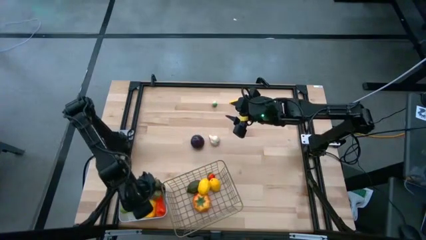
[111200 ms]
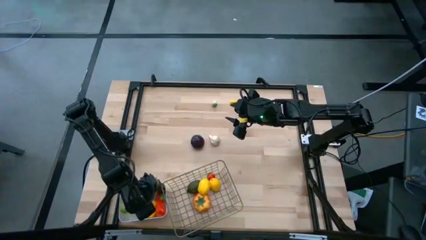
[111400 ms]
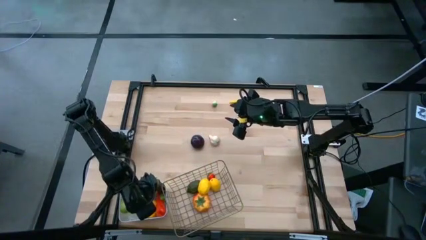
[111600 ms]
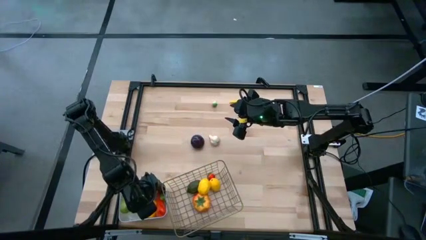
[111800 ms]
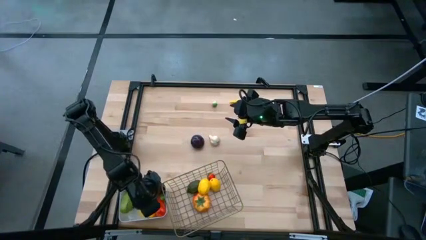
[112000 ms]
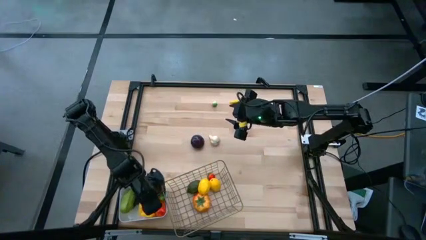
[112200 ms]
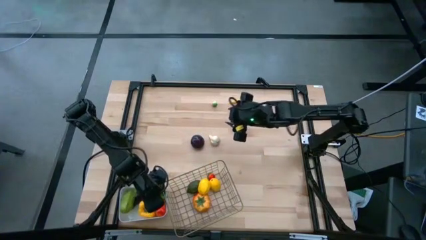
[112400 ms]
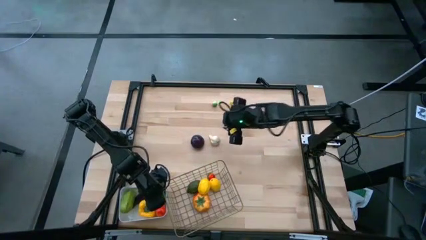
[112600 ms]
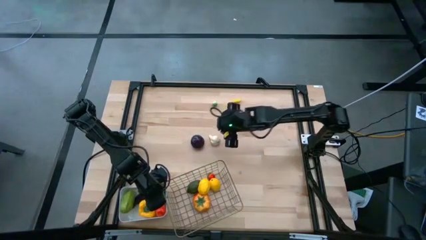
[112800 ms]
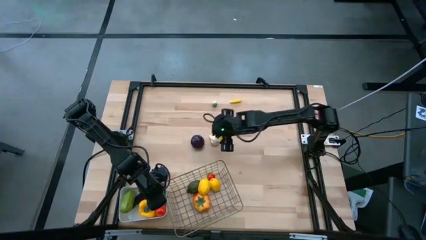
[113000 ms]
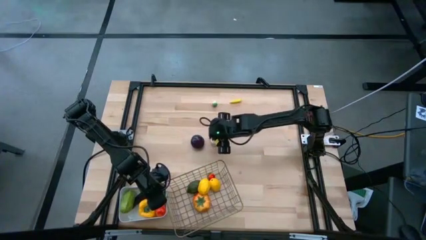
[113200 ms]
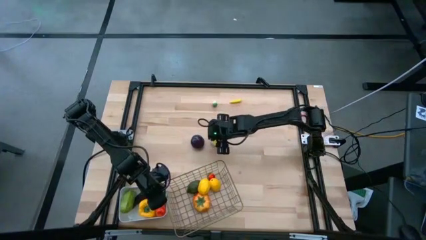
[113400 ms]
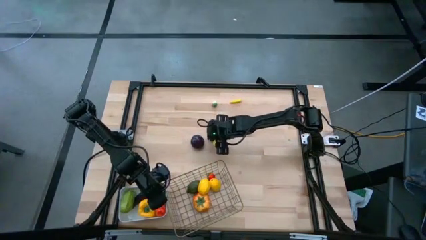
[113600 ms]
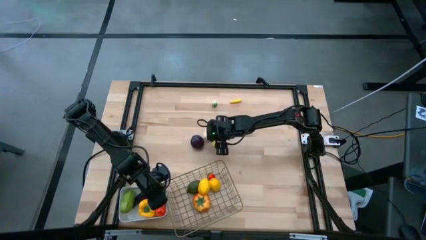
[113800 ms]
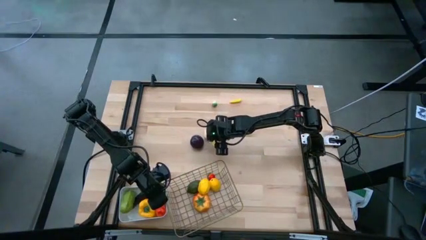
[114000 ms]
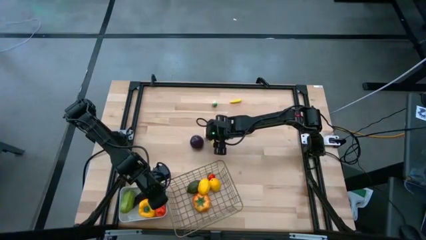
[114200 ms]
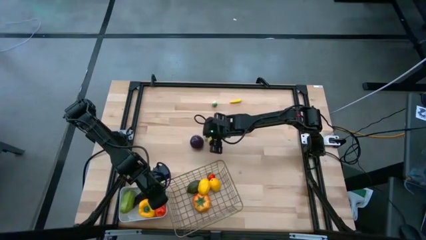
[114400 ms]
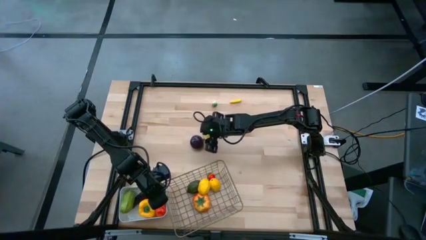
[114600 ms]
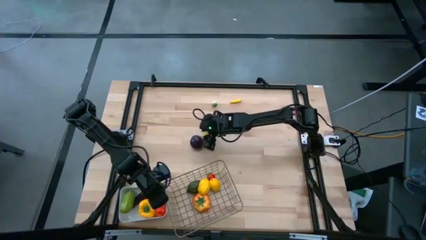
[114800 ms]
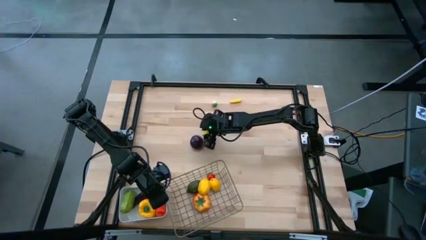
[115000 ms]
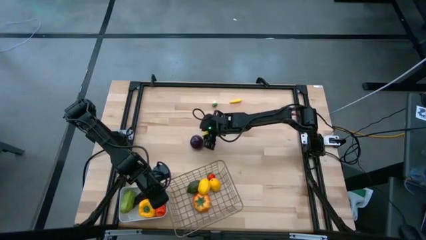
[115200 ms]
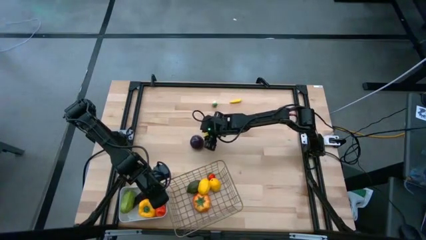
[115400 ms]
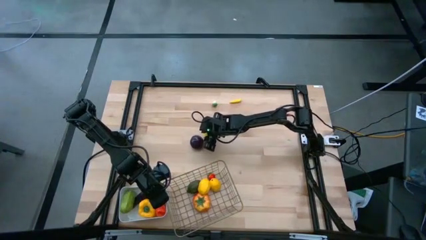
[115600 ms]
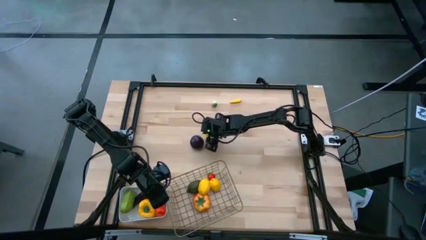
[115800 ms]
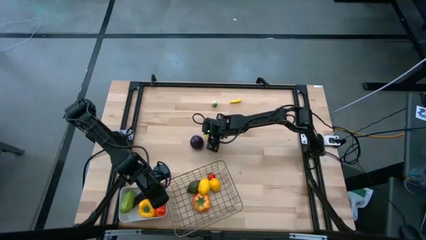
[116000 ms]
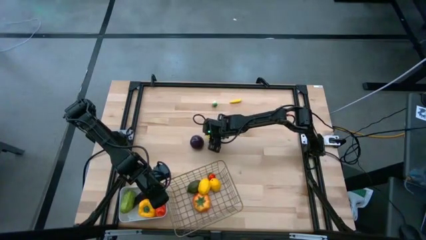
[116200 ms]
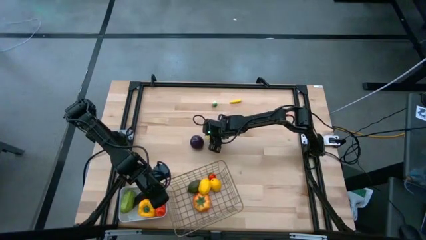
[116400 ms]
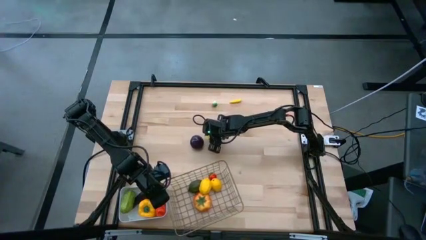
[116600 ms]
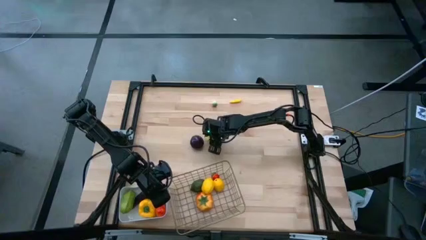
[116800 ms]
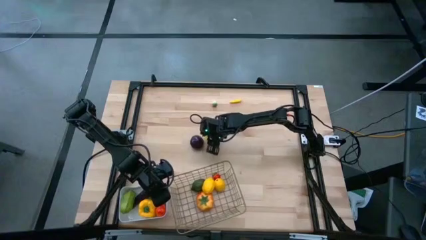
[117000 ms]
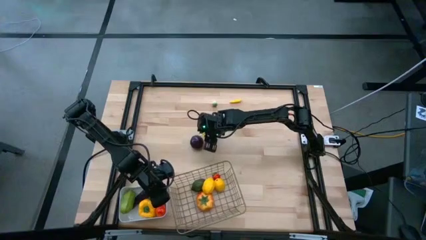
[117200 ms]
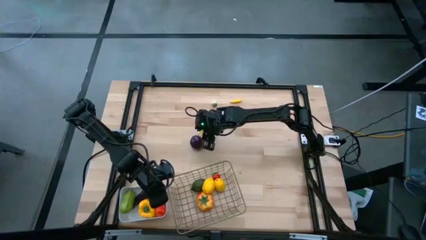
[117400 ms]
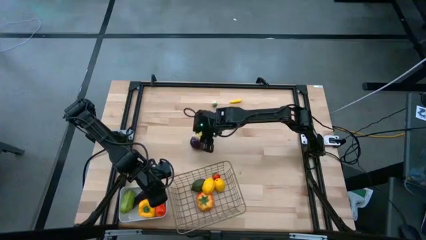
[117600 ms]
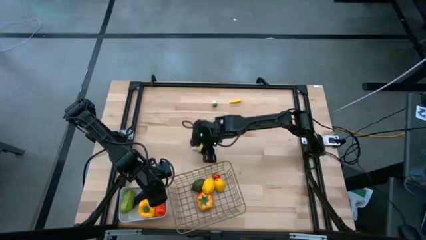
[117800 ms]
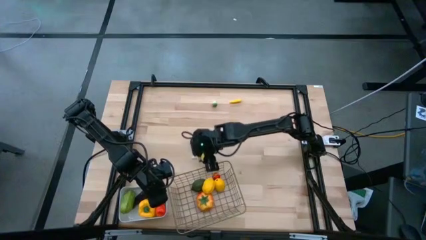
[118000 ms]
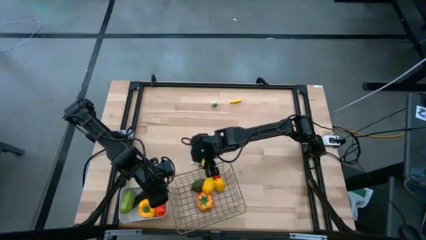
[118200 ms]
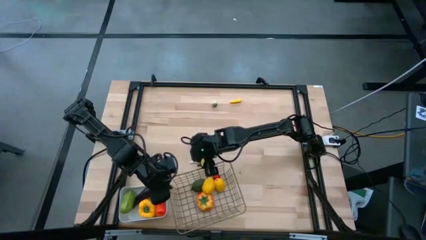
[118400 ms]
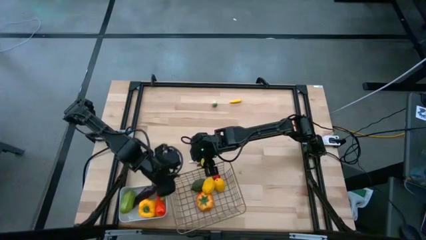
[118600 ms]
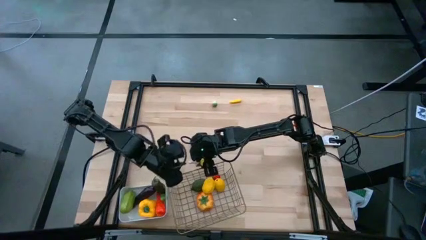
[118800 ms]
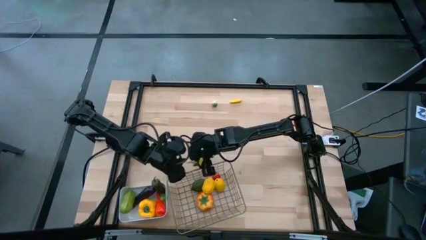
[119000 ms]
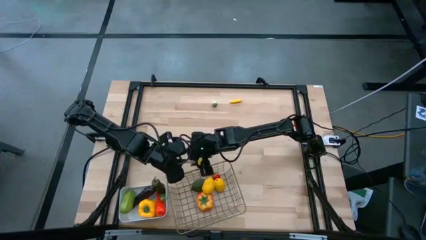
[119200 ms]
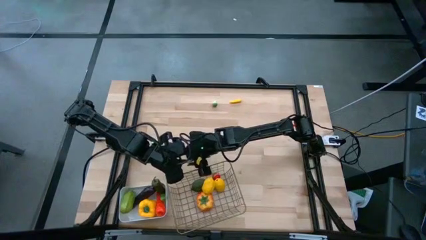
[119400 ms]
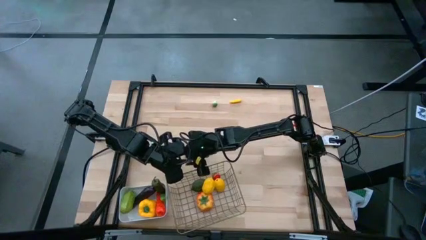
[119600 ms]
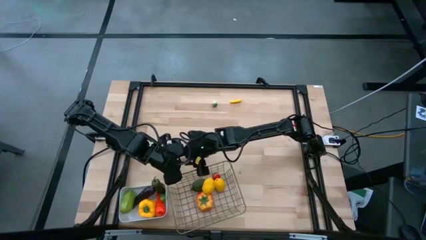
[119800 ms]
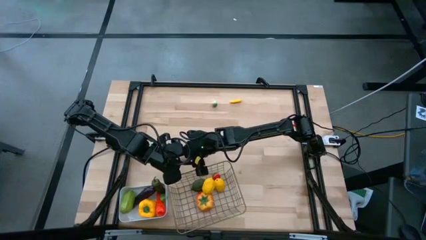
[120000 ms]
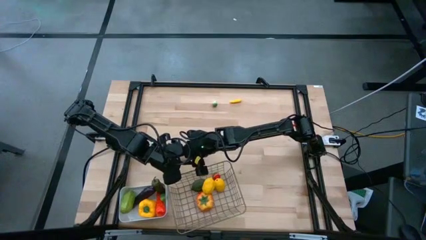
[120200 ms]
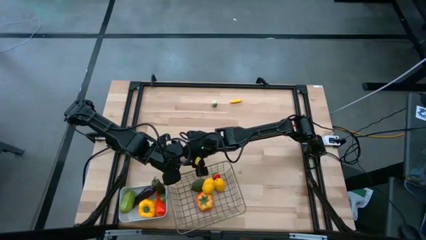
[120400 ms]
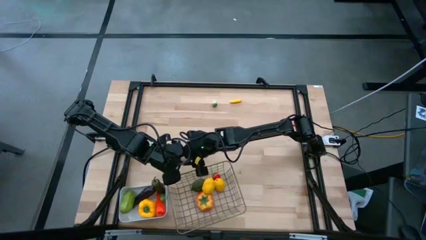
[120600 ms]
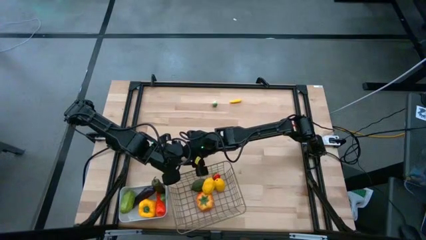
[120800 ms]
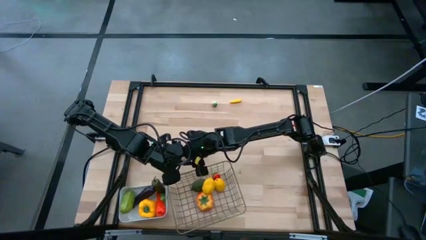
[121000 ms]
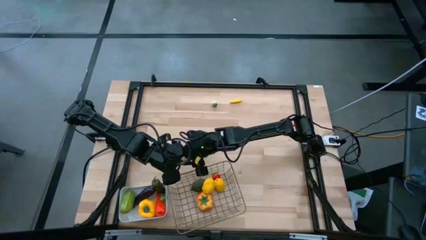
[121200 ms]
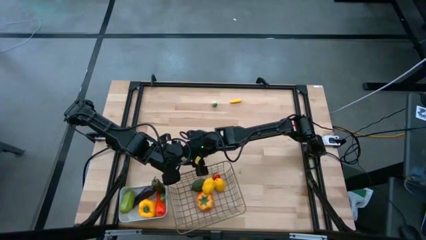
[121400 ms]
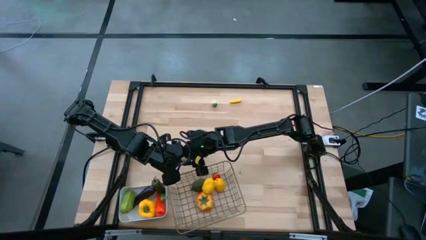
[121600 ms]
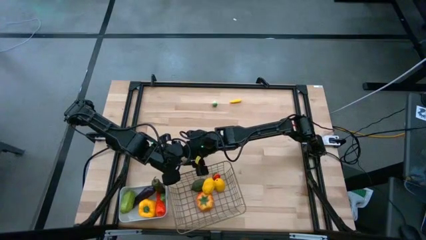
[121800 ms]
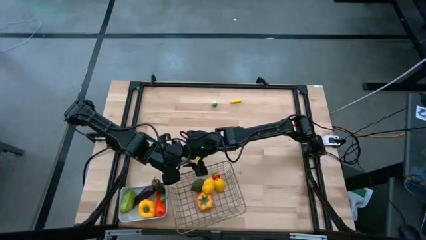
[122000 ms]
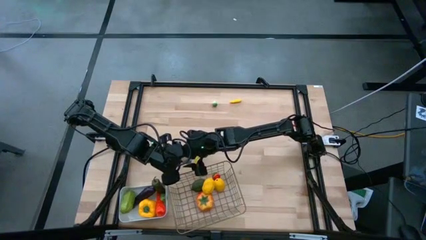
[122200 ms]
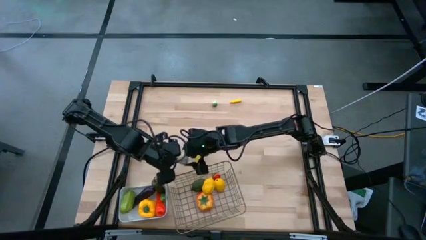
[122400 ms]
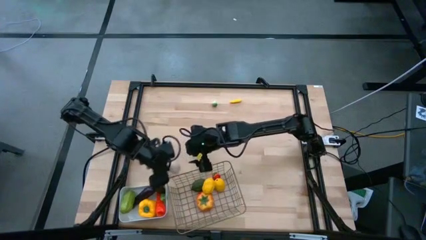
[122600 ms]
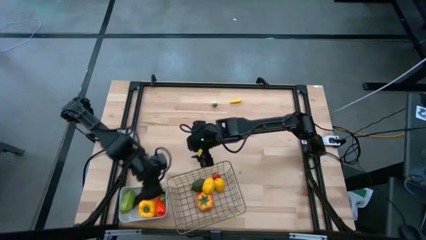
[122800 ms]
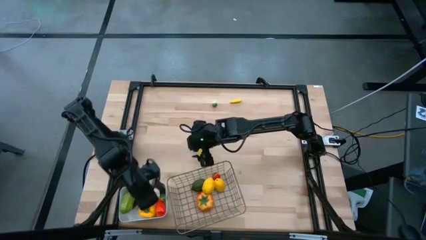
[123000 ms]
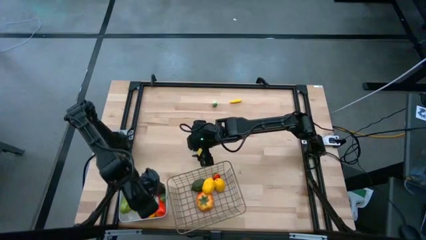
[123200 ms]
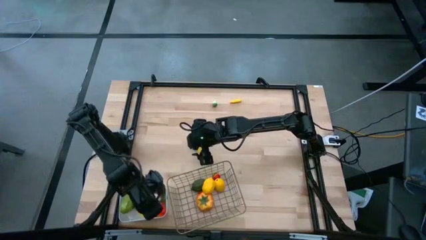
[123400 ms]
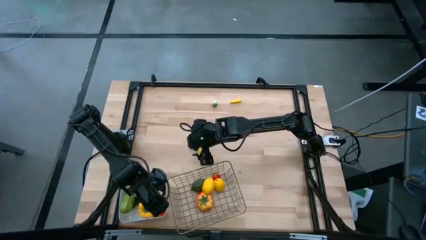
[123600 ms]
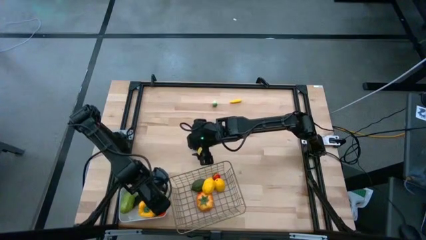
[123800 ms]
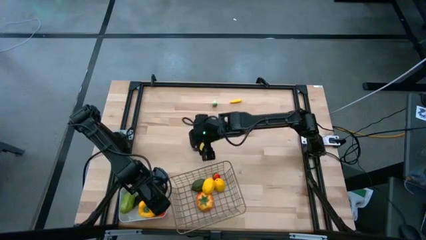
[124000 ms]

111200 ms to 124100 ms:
Task: Sort produce into baskets
Put the white garlic into the white bin

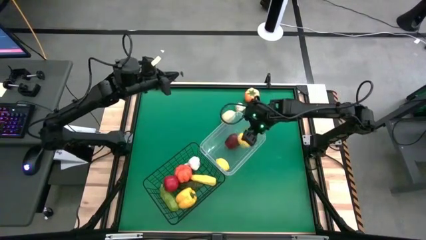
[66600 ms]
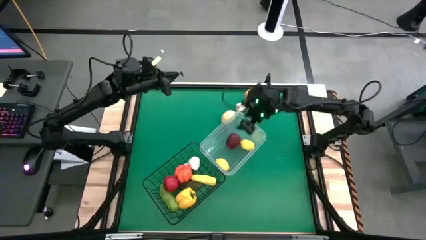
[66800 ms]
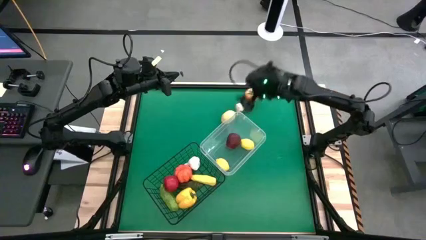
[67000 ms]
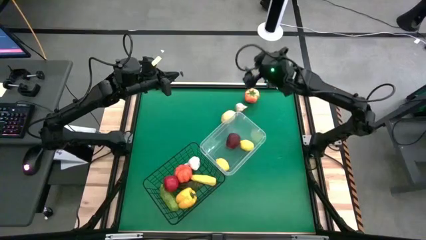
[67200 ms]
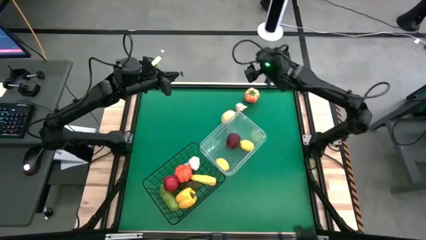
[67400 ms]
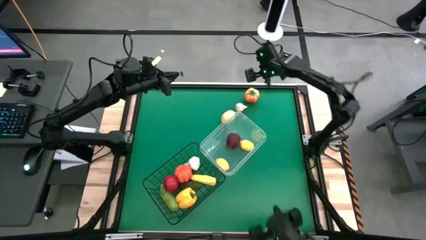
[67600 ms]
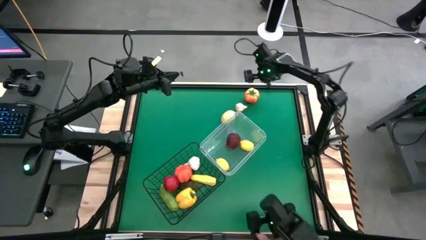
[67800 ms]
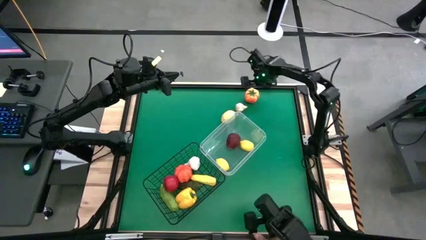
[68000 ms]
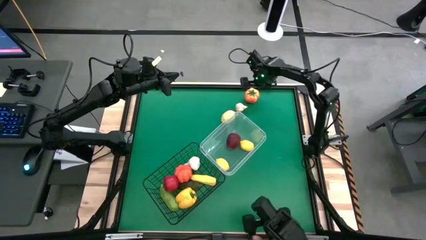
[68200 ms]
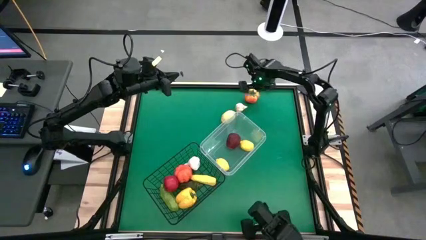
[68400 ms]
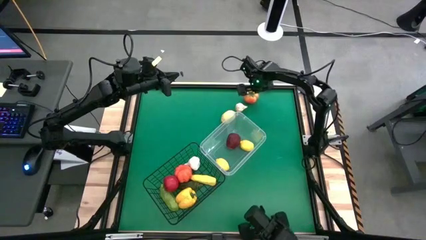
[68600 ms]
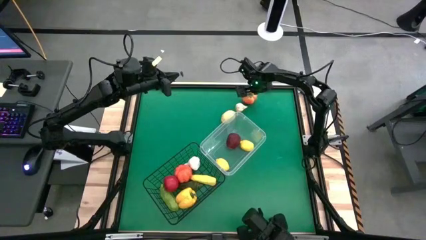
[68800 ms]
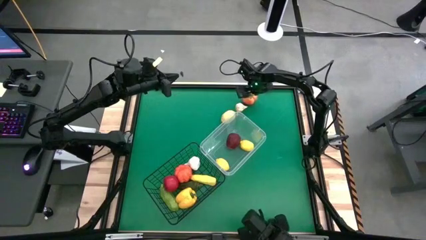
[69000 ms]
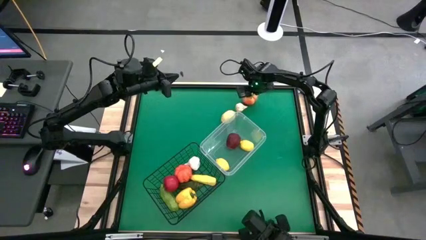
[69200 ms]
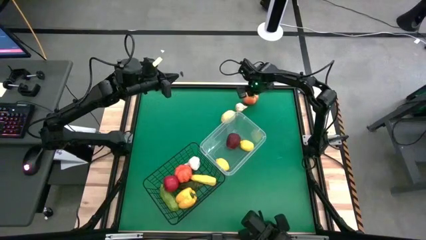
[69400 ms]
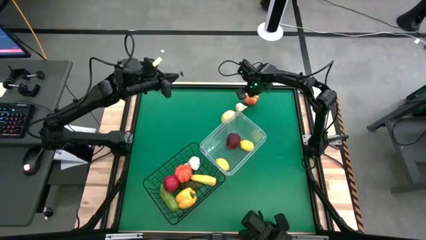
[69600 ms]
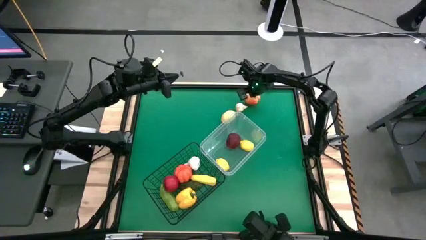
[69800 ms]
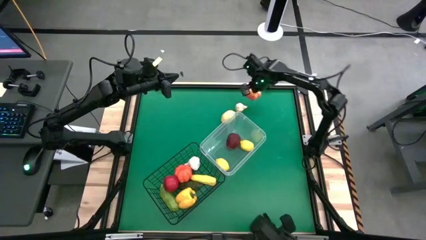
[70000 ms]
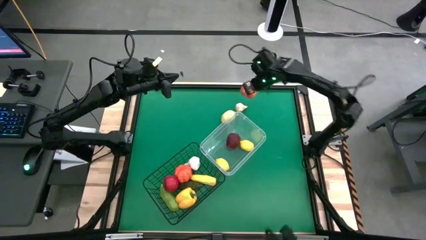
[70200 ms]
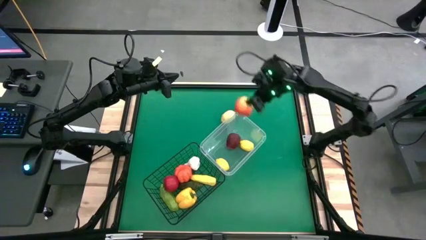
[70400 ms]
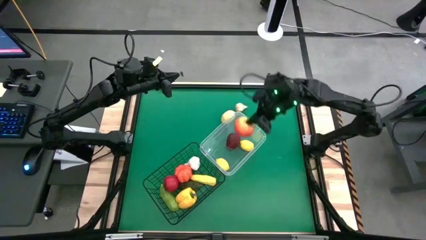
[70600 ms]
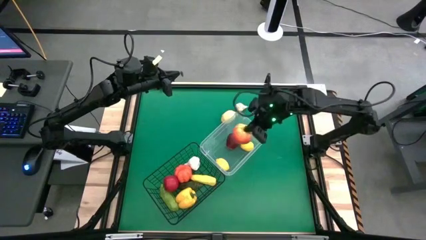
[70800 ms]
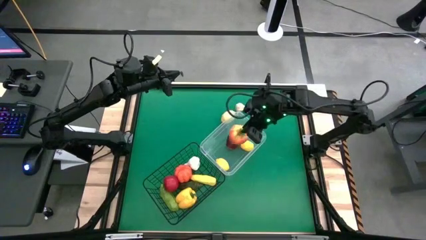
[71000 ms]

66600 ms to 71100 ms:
Task: Sort produce into baskets
Put the tomato into the transparent bin
